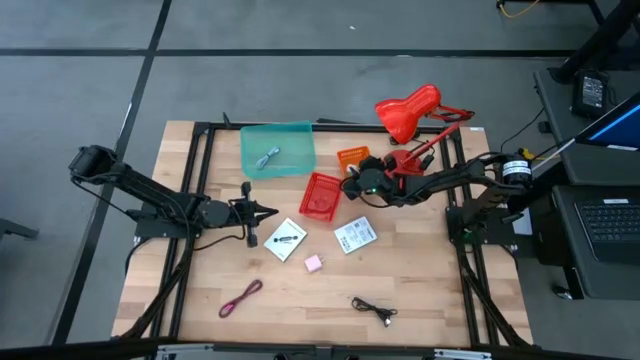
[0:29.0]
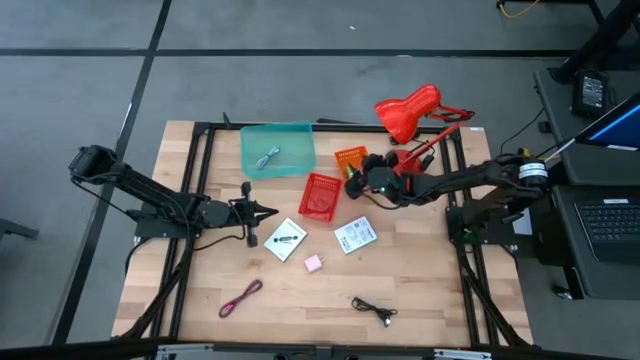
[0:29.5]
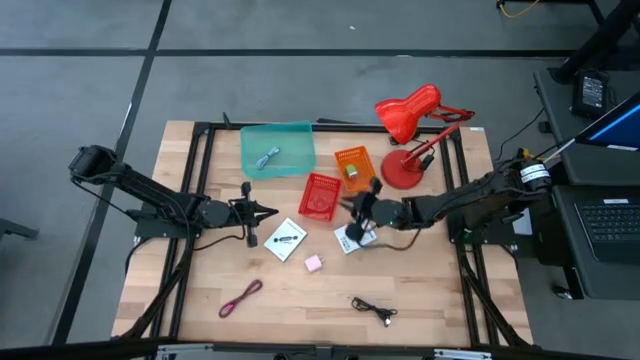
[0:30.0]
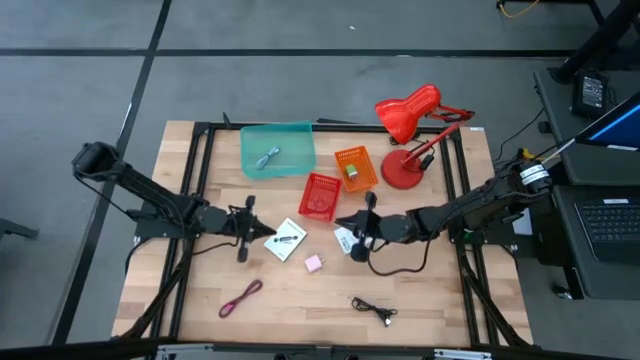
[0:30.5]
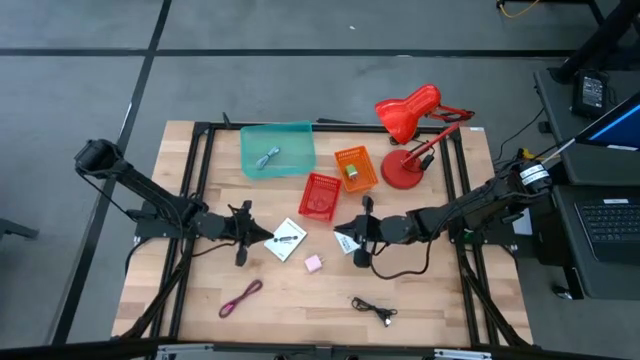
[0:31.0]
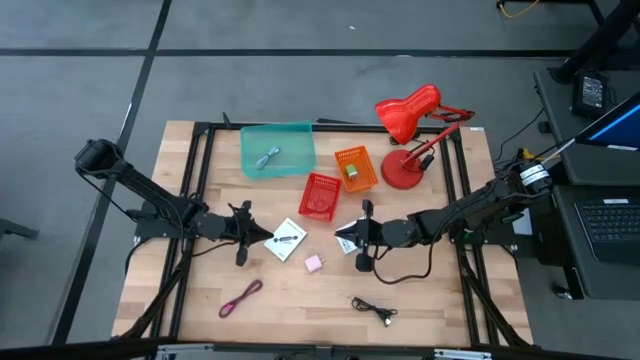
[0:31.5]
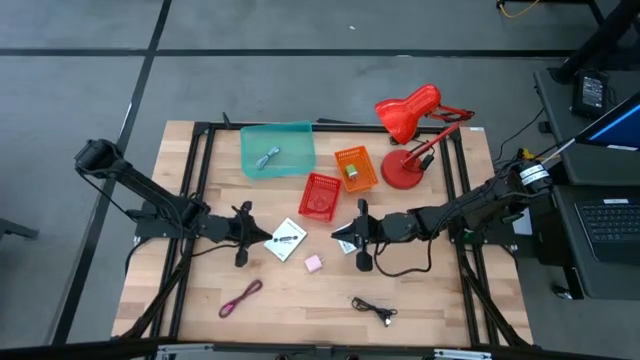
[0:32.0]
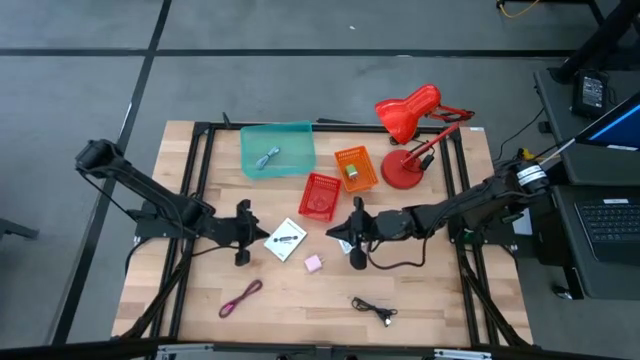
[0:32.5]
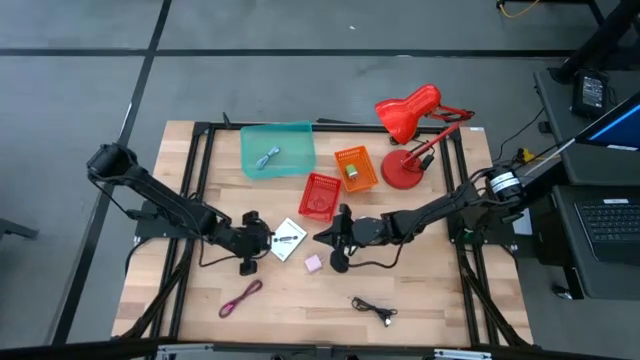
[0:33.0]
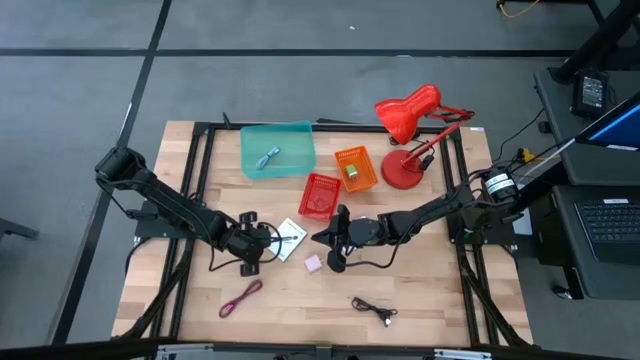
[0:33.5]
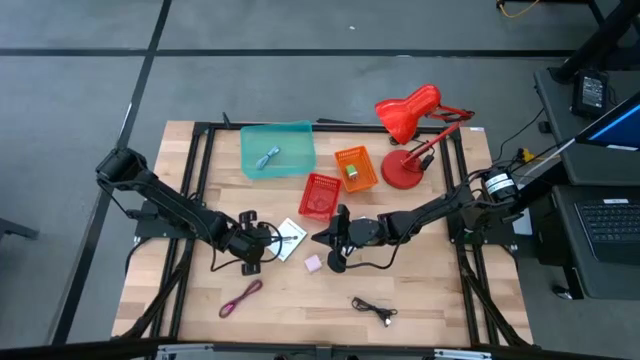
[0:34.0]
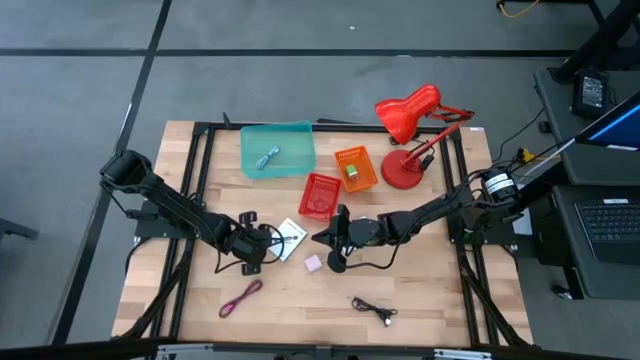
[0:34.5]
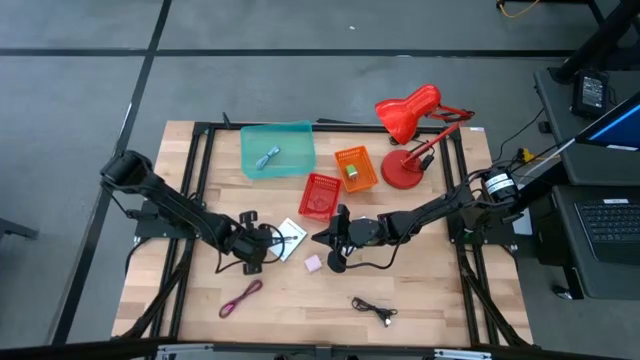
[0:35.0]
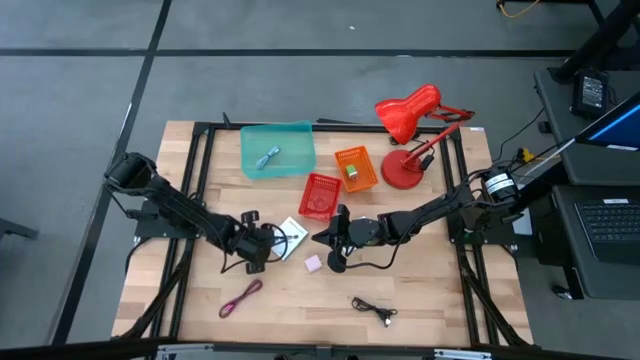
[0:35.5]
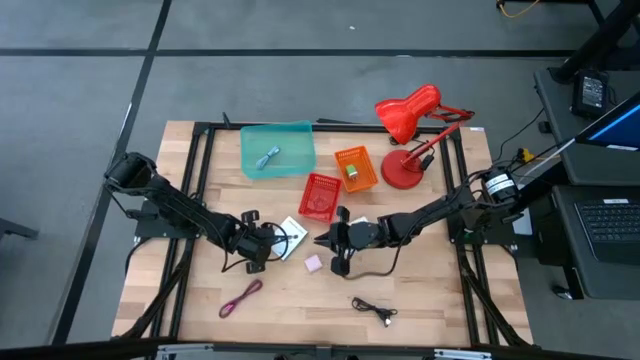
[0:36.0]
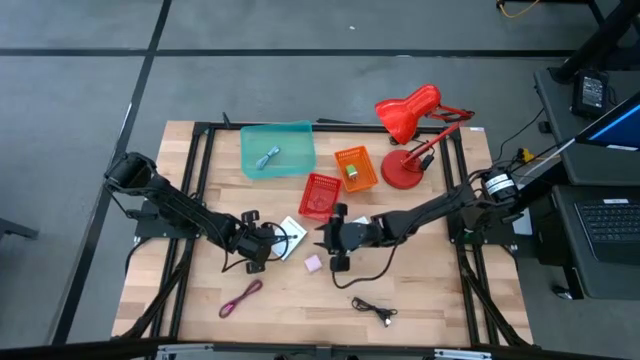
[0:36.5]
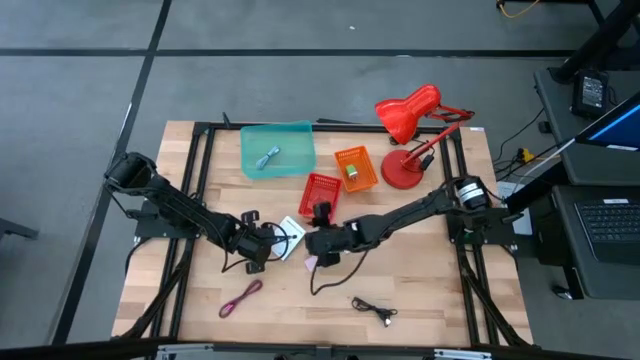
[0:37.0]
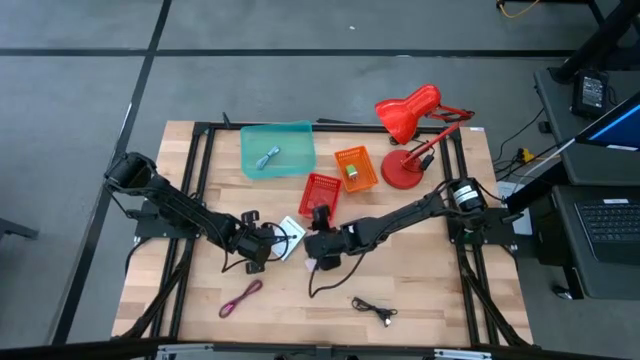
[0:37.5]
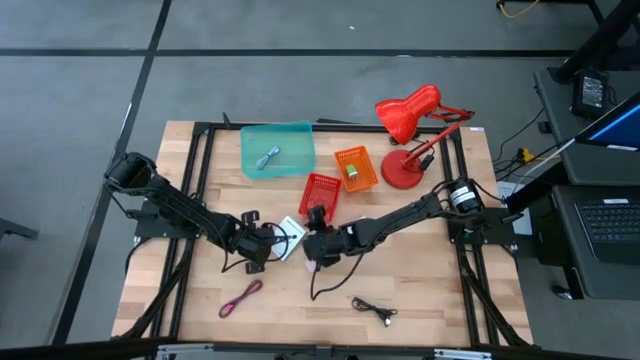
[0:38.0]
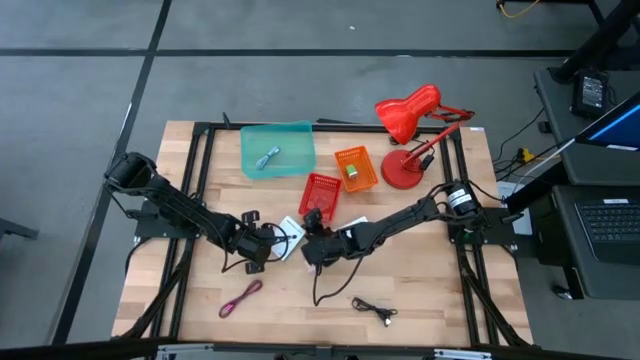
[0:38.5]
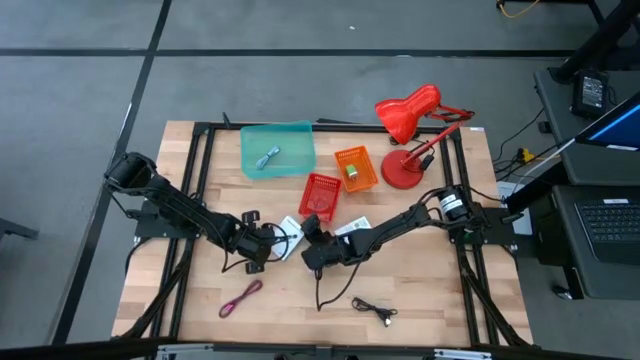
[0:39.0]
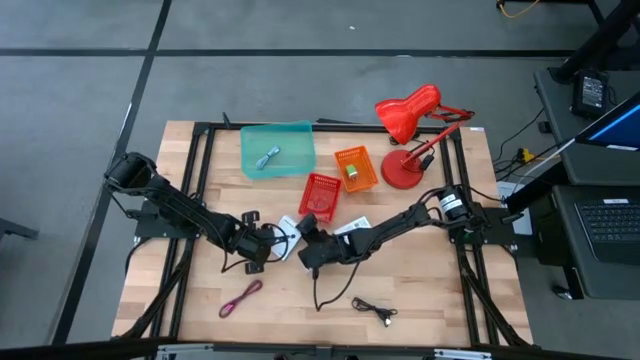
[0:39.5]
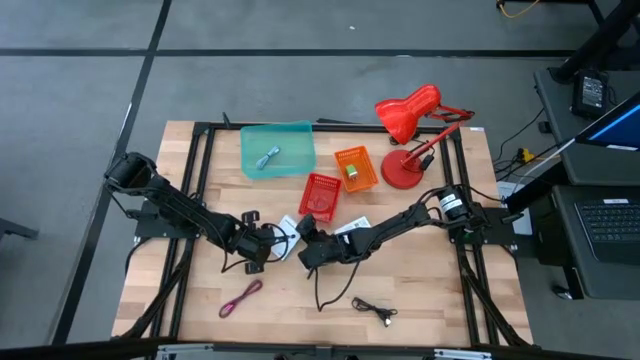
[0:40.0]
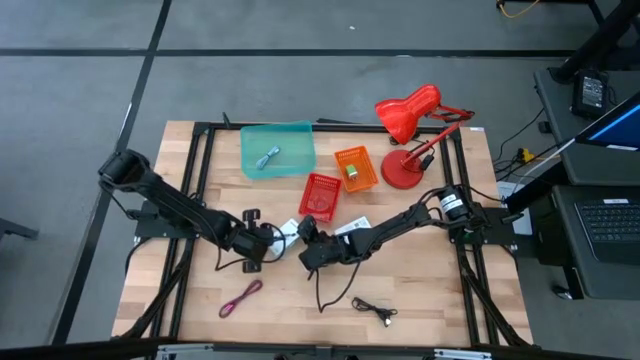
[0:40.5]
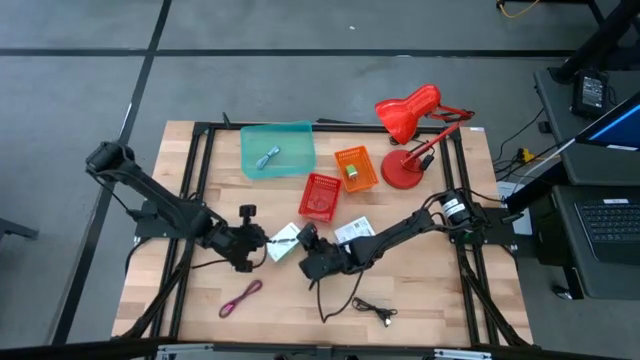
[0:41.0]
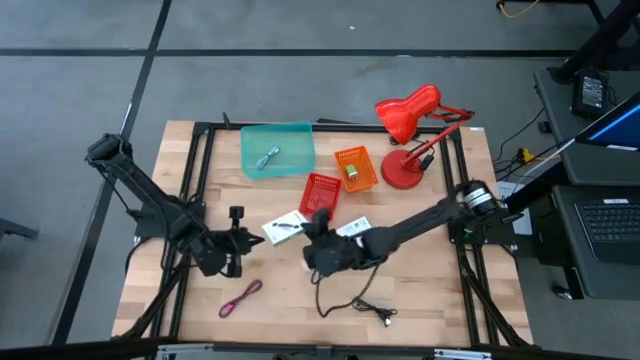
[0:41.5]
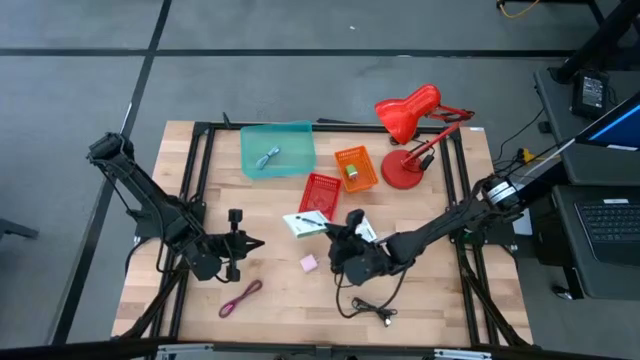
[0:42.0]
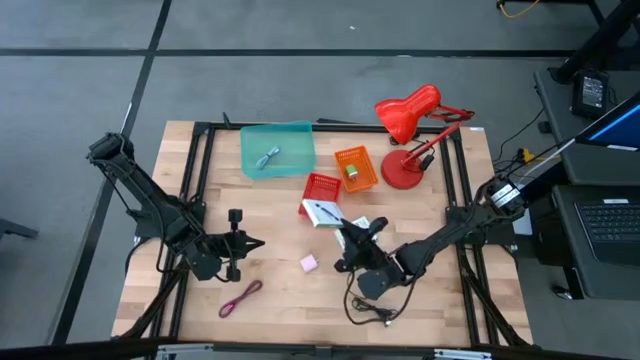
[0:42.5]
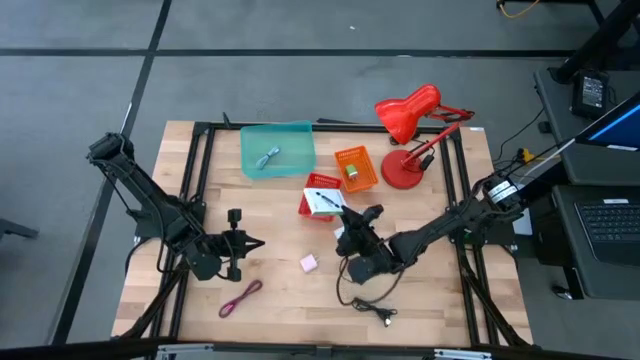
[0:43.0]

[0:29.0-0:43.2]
Task: Pick and place items into bin
Put the left card reader box into the red bin

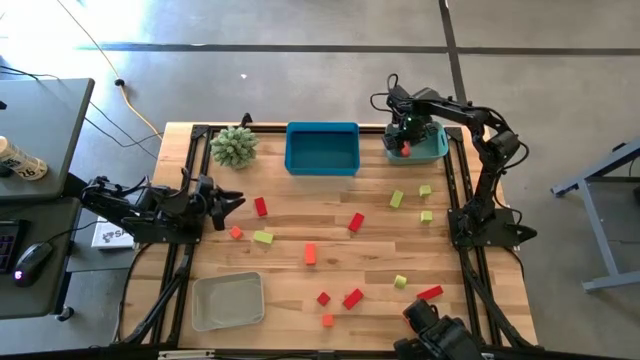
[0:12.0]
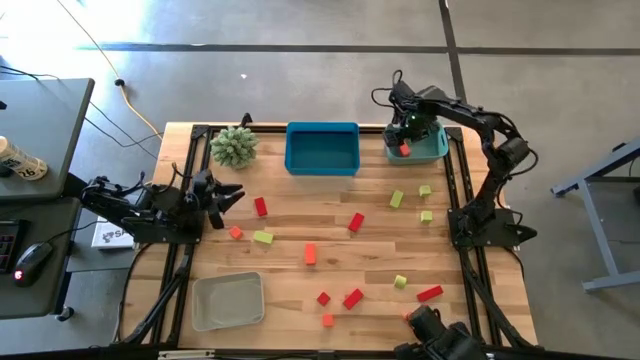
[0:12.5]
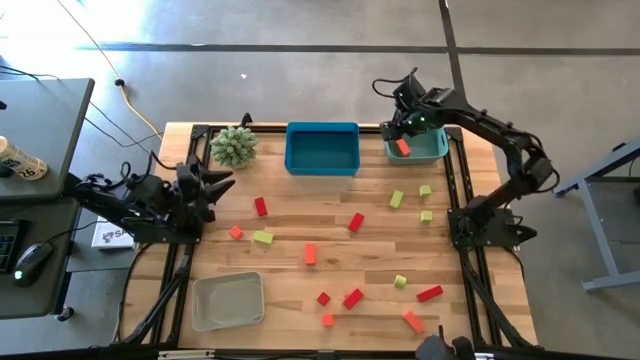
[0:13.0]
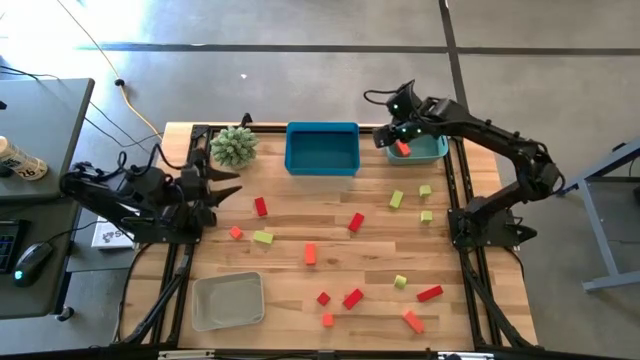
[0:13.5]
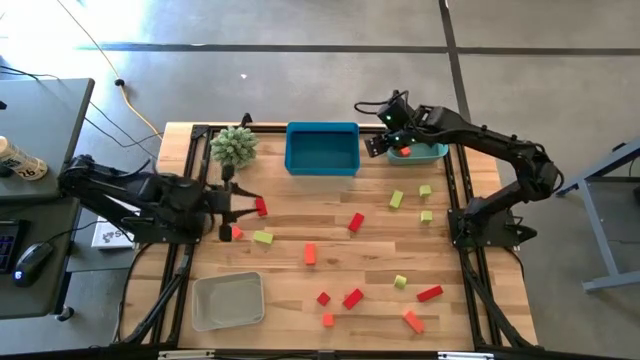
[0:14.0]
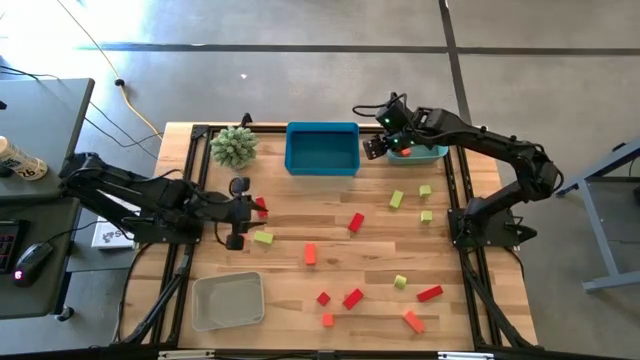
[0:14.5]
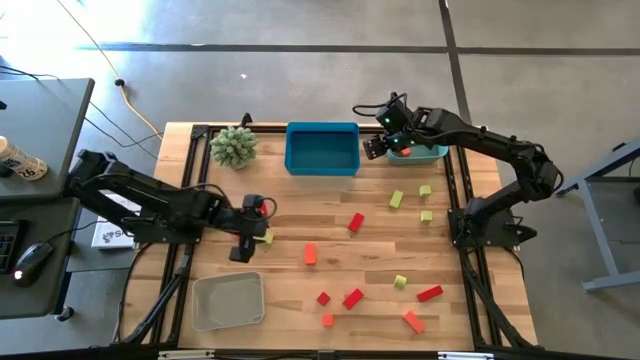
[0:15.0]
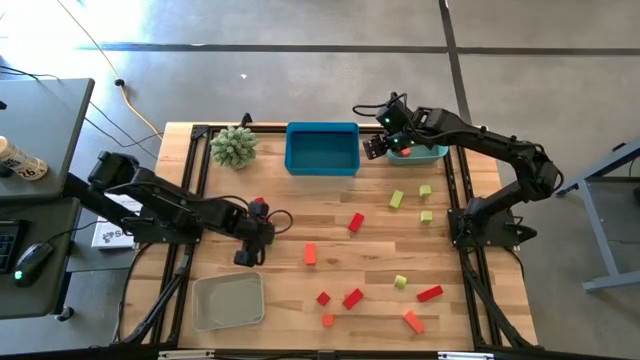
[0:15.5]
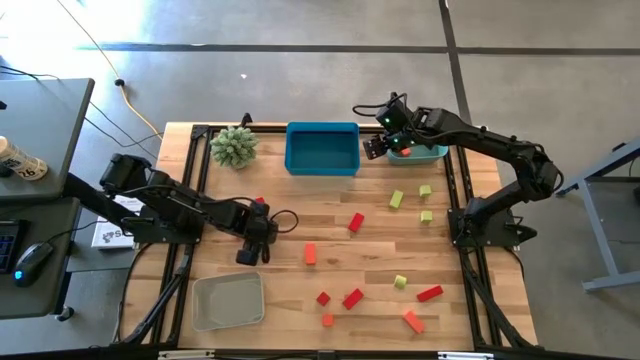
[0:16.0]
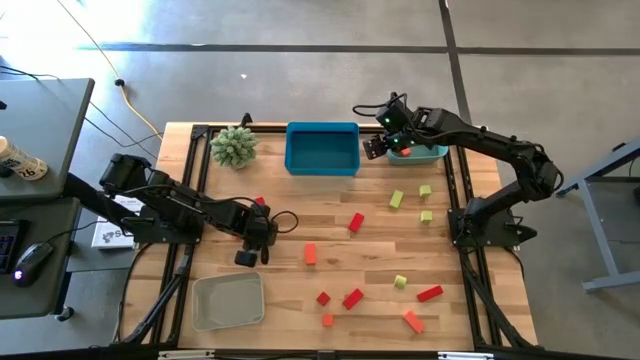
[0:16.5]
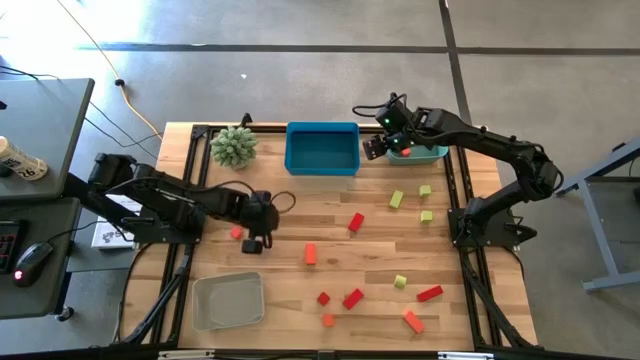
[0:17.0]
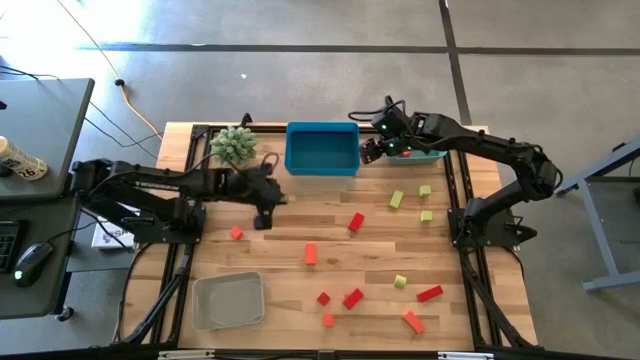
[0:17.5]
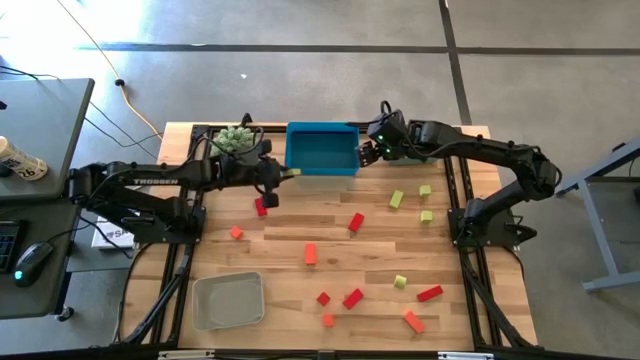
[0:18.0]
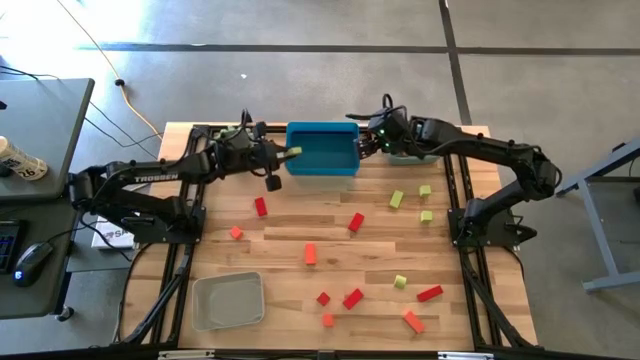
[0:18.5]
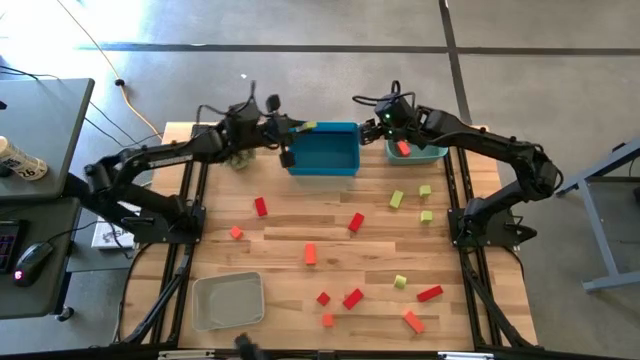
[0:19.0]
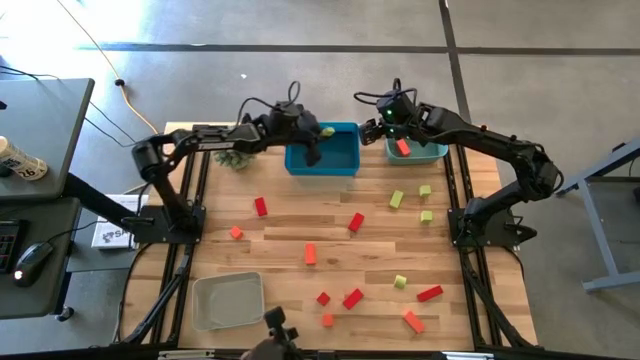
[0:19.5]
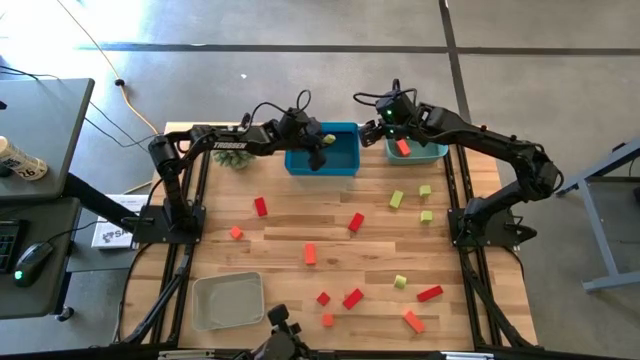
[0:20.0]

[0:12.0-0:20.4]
Task: Sort & place blocks by color
Put the green block into the blue bin
